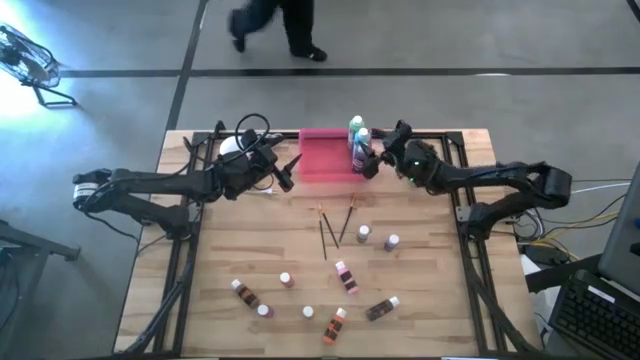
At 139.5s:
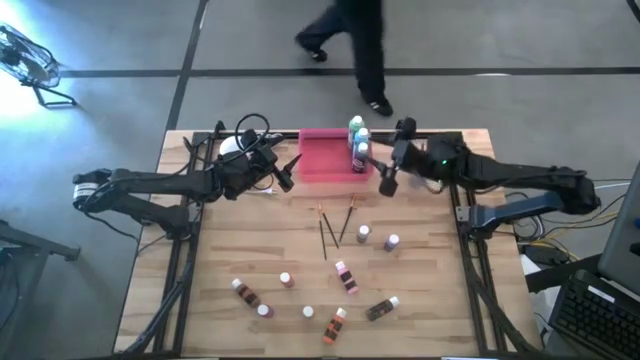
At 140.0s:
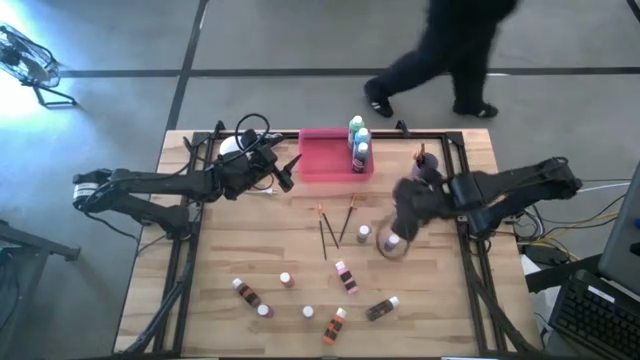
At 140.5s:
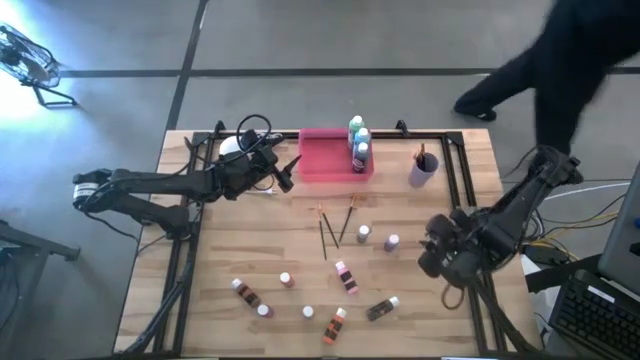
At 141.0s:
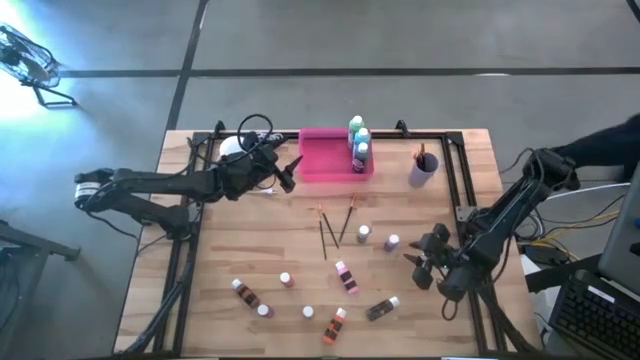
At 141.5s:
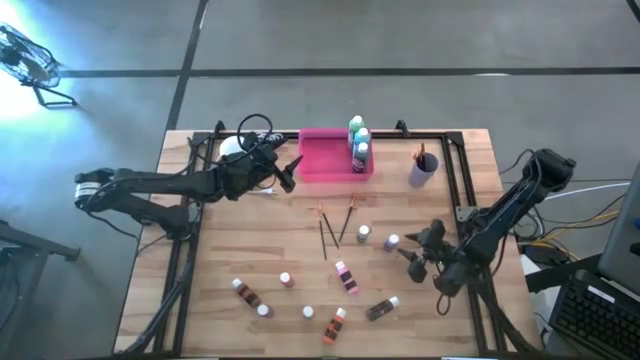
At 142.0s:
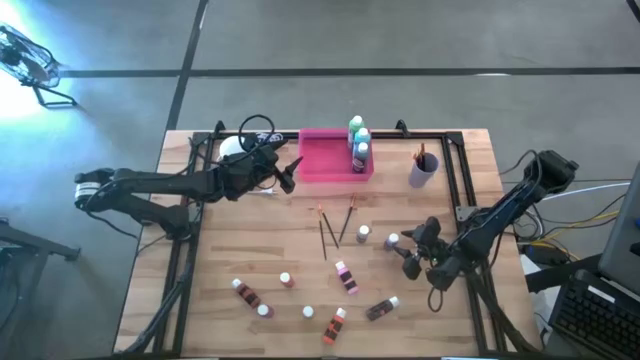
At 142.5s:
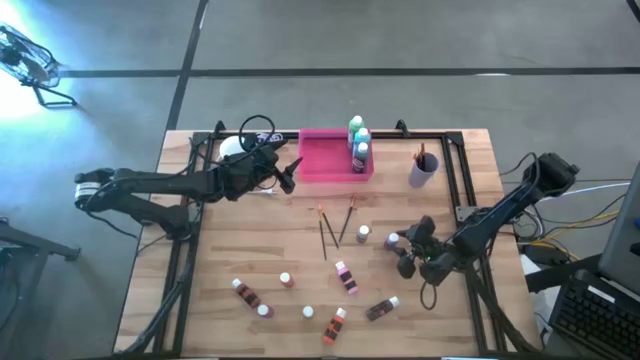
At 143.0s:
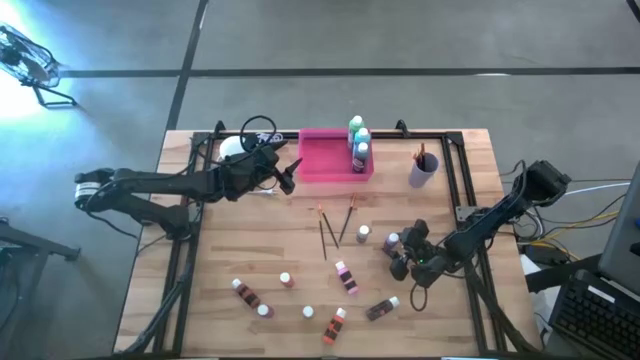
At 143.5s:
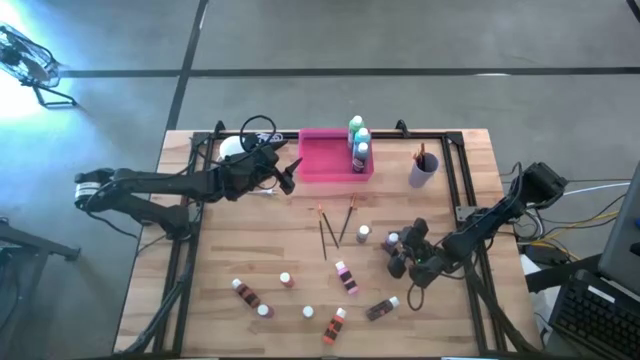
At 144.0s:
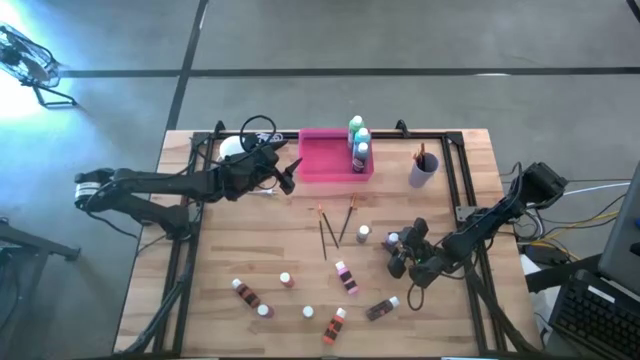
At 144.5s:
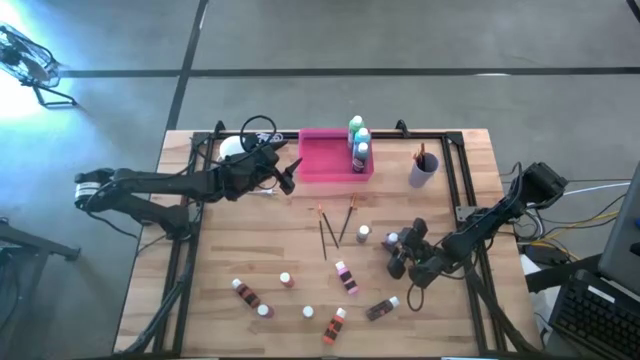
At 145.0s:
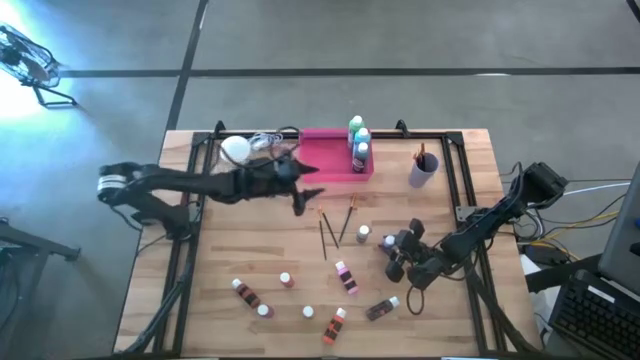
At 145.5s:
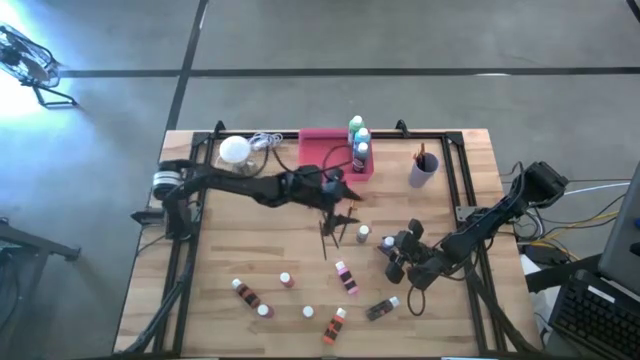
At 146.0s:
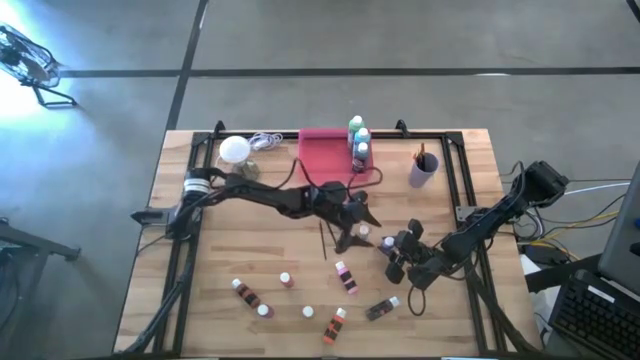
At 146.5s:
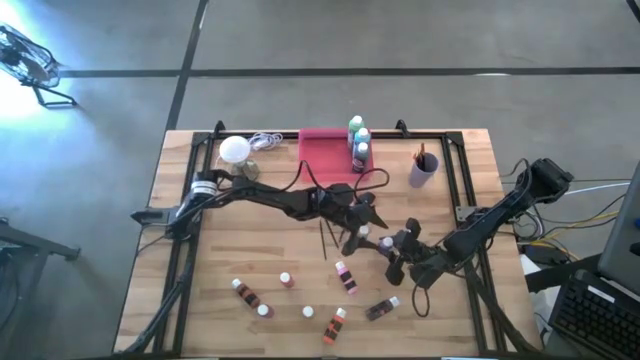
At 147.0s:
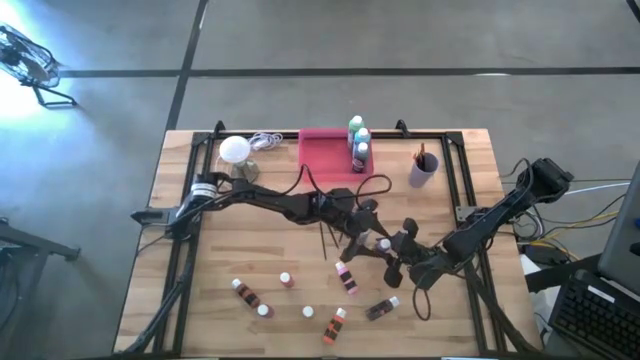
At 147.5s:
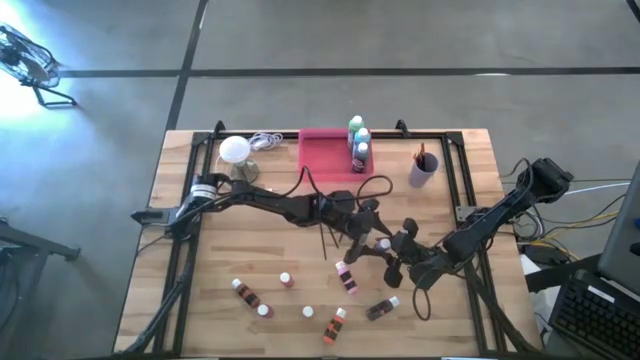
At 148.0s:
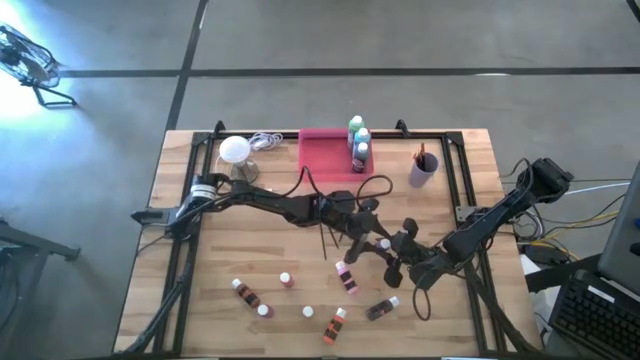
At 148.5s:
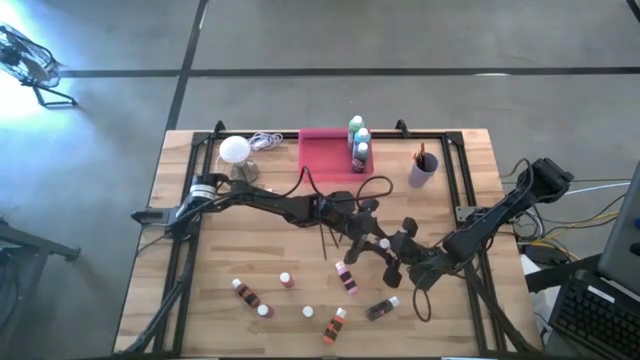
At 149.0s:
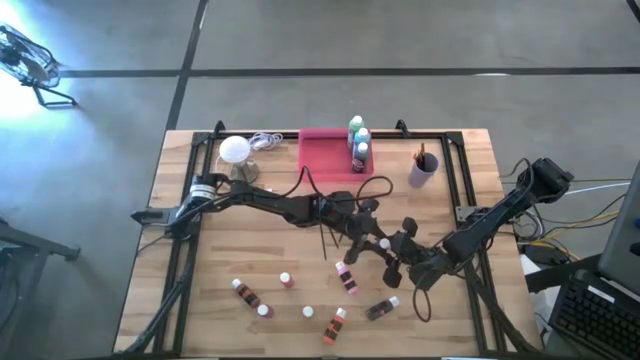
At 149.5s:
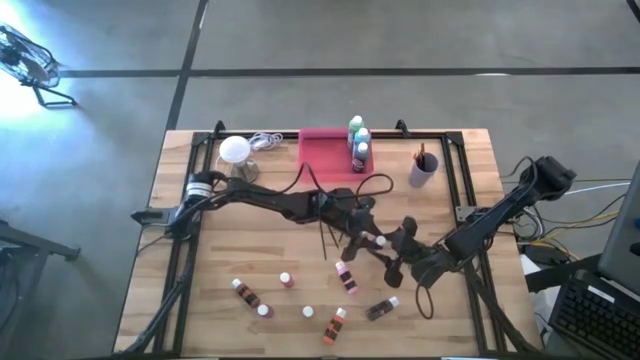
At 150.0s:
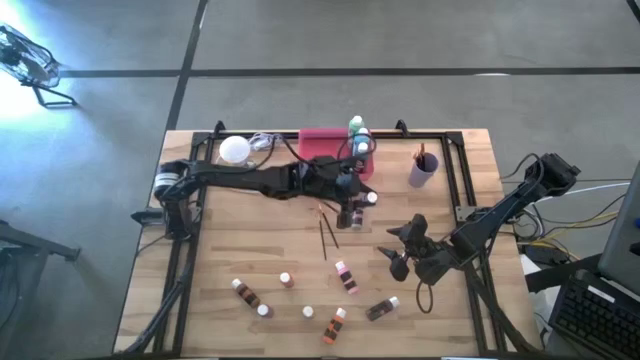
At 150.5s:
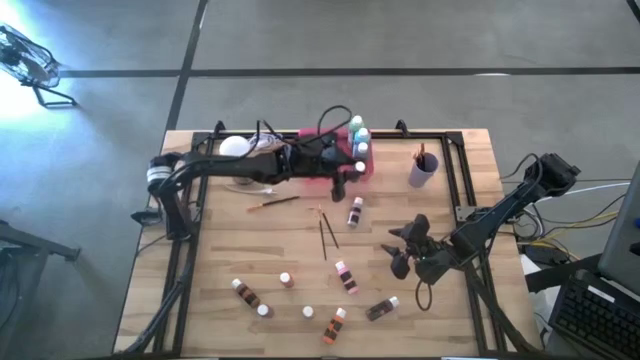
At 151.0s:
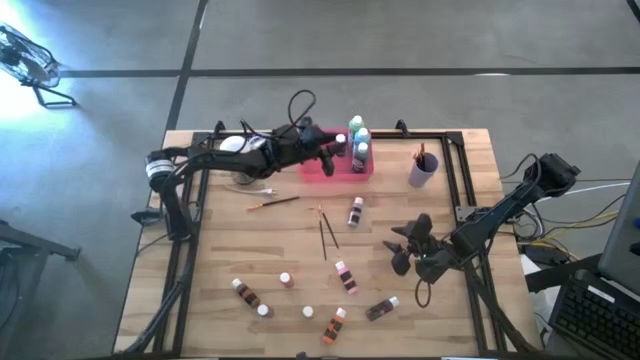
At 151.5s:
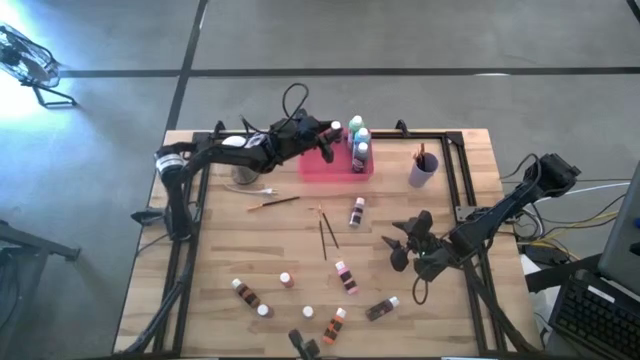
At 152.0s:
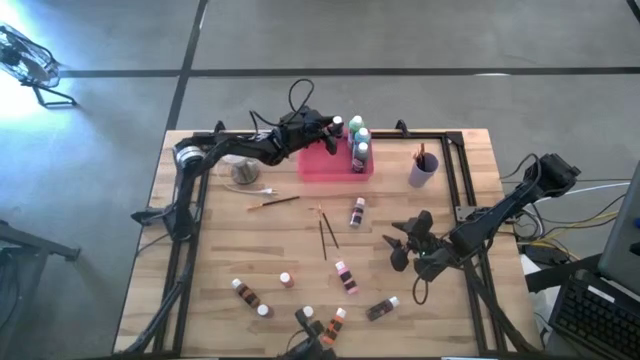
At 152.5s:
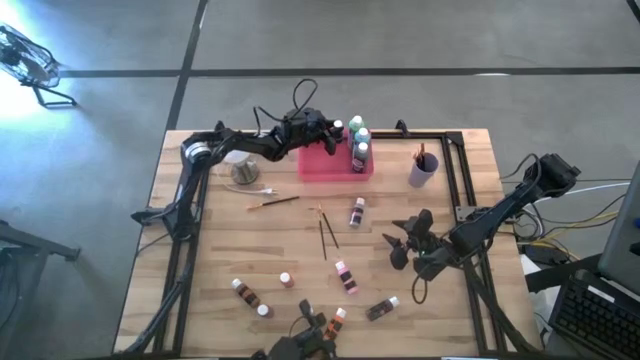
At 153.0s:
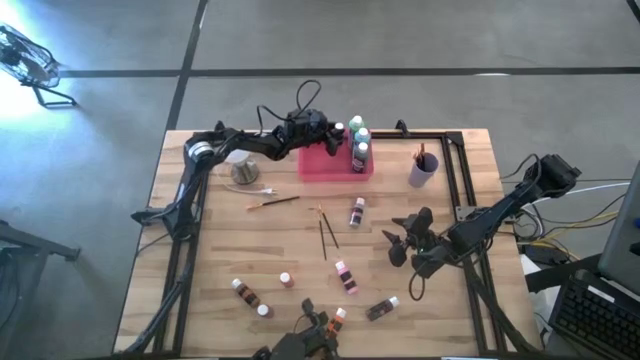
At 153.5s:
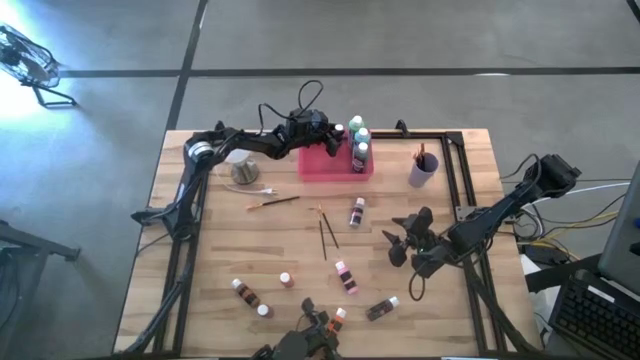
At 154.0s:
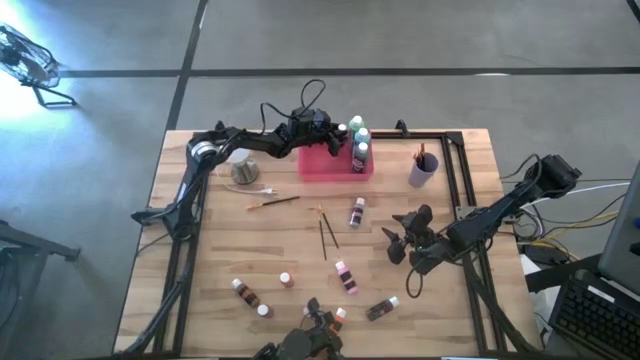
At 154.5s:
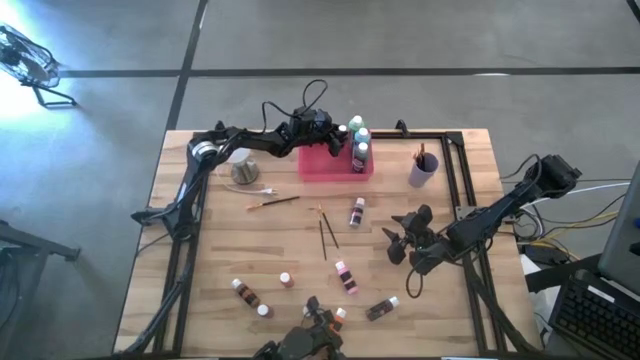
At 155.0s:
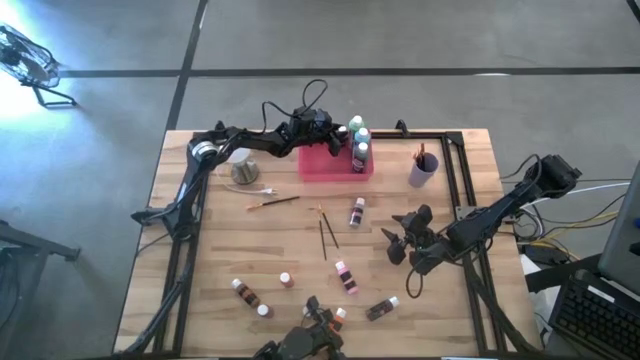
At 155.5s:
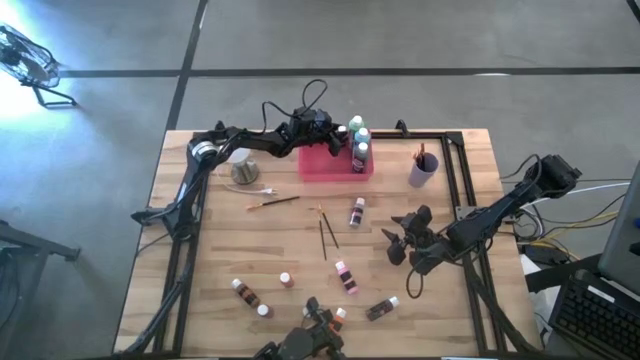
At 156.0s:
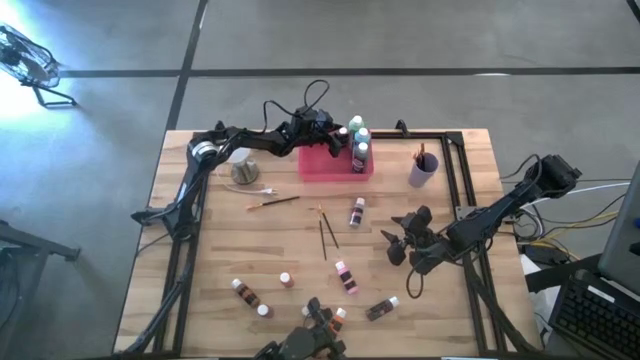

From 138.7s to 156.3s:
Task: Pick & Place Paint Supplies
Put the violet black paint bottle into the pink bin

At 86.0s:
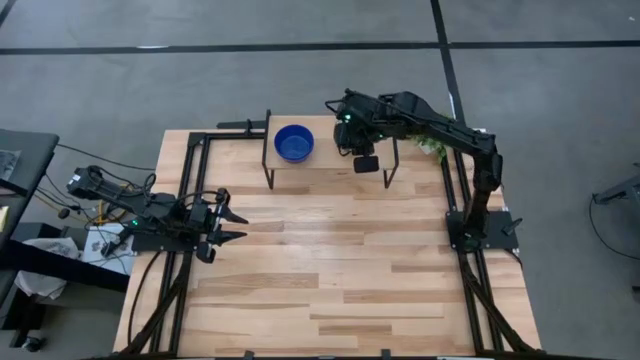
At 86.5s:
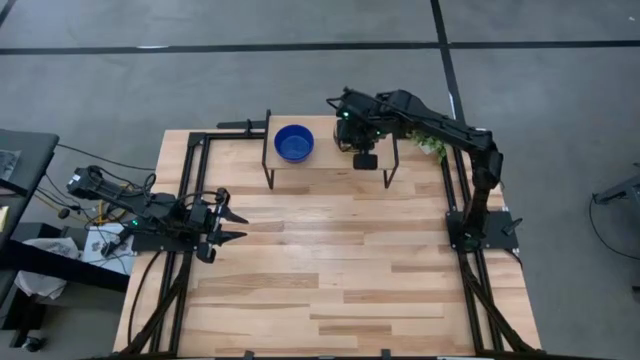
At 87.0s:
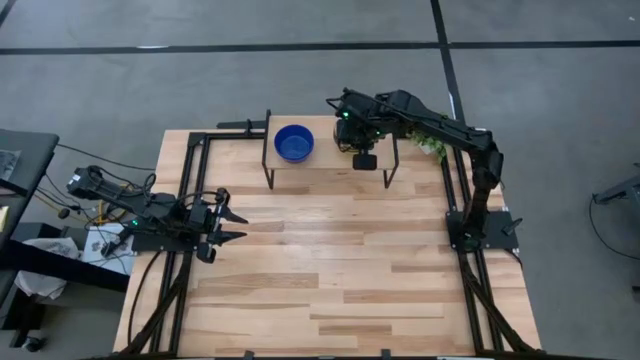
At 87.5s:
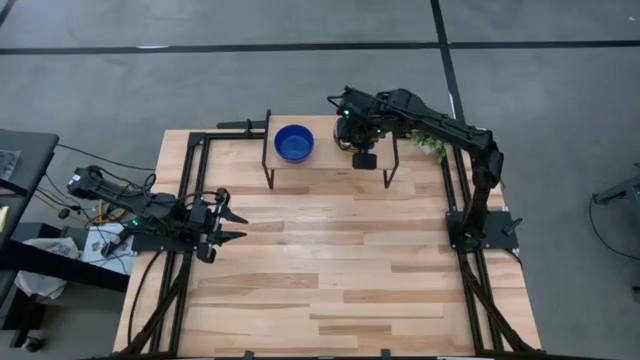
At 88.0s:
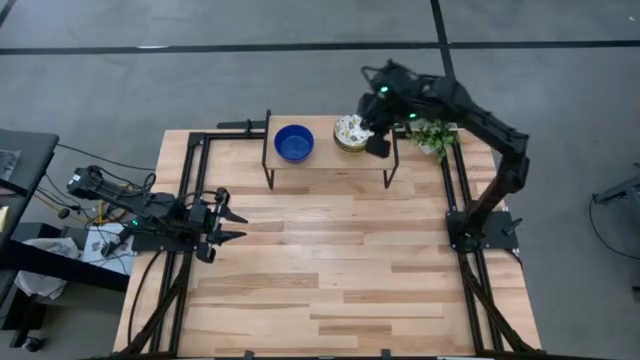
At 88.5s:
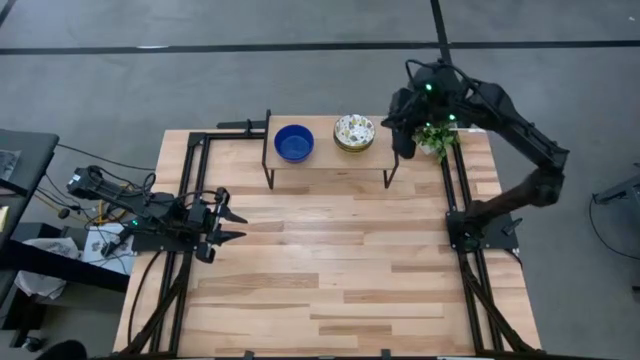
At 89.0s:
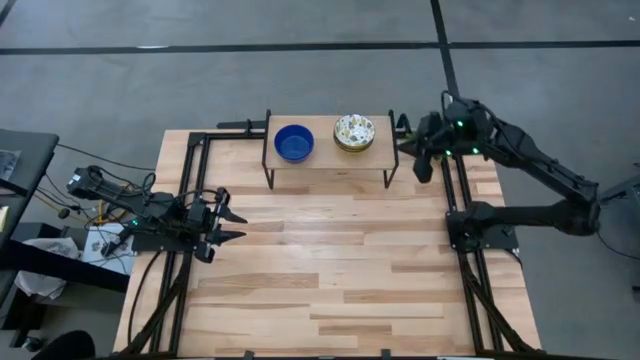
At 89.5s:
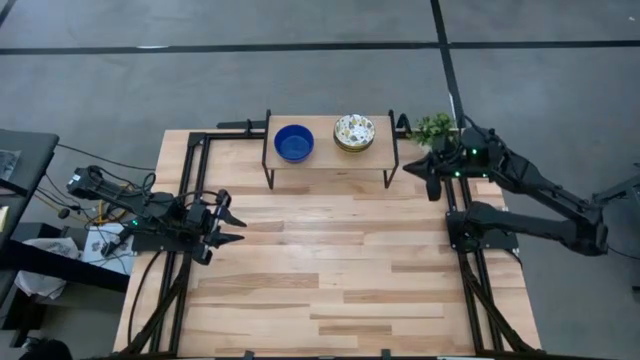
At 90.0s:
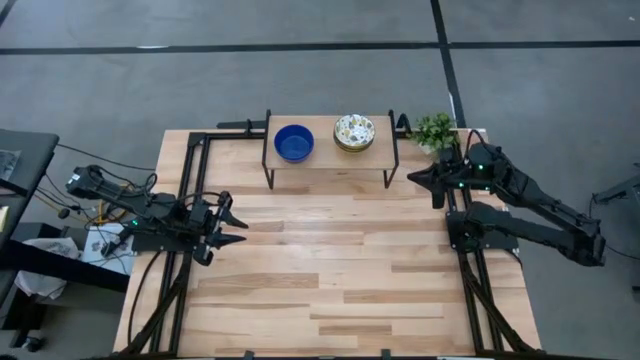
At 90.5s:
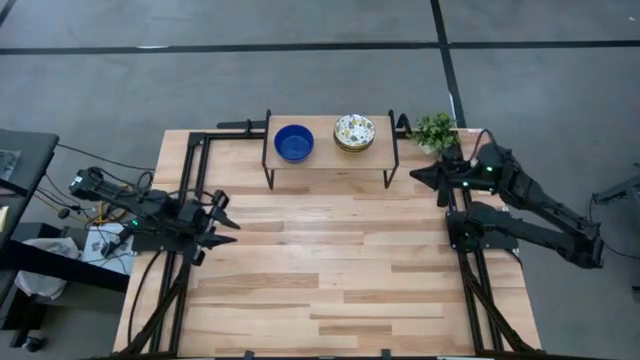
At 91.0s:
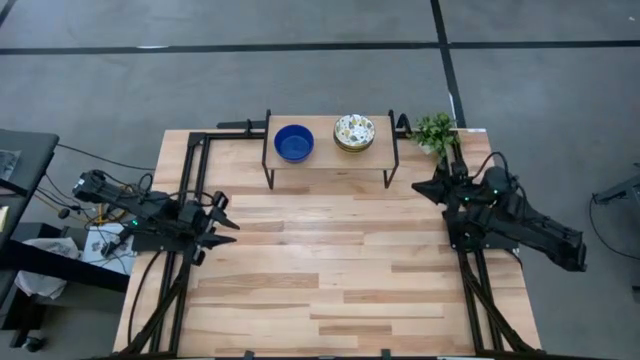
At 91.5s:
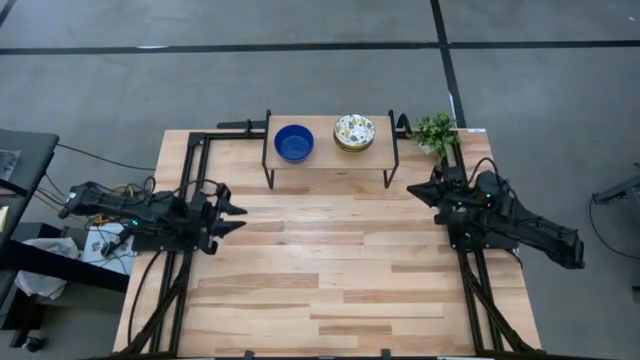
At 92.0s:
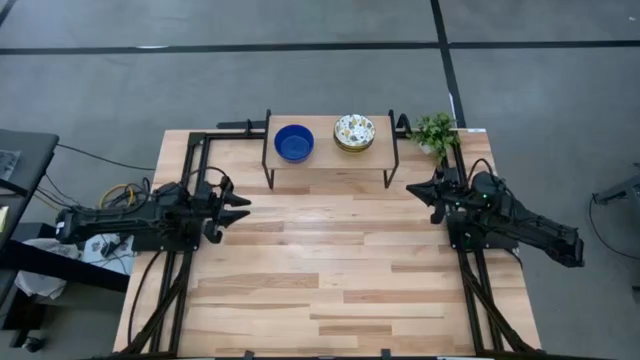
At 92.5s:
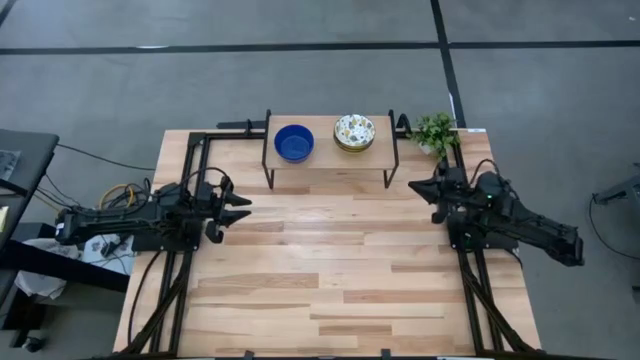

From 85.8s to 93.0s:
Task: Pick & Place Mini bowls
Return to Home Position
